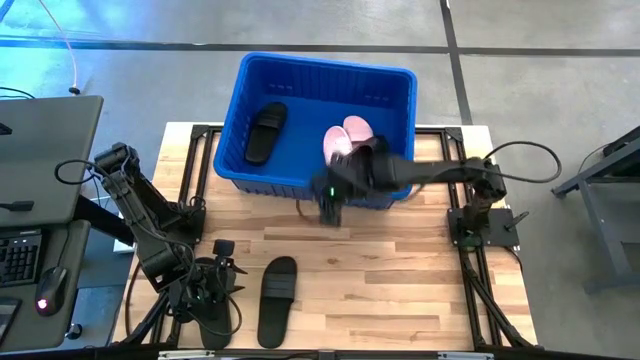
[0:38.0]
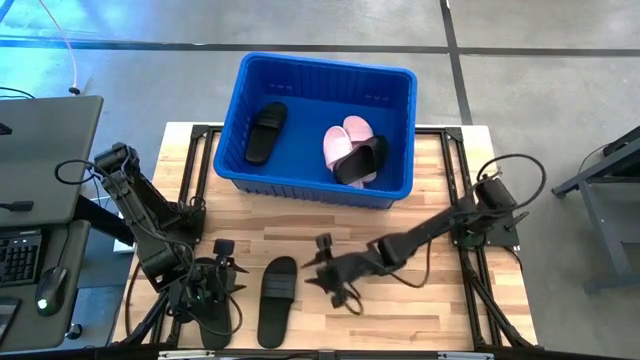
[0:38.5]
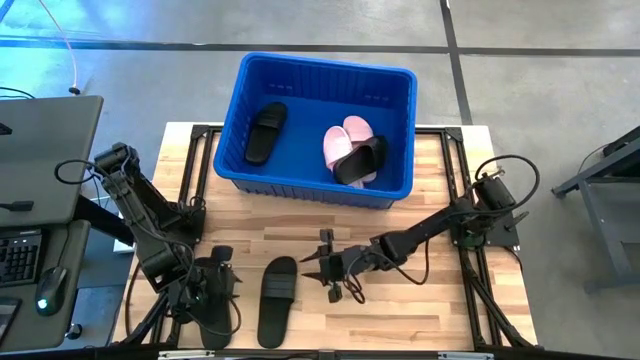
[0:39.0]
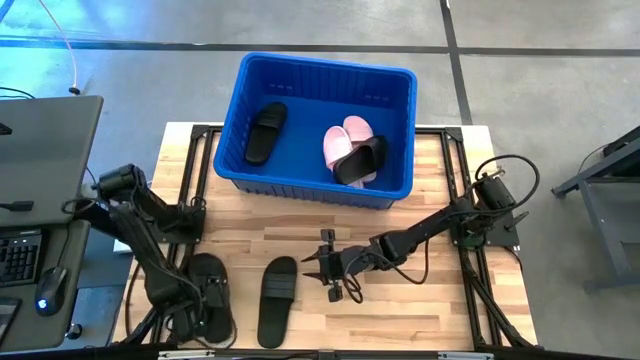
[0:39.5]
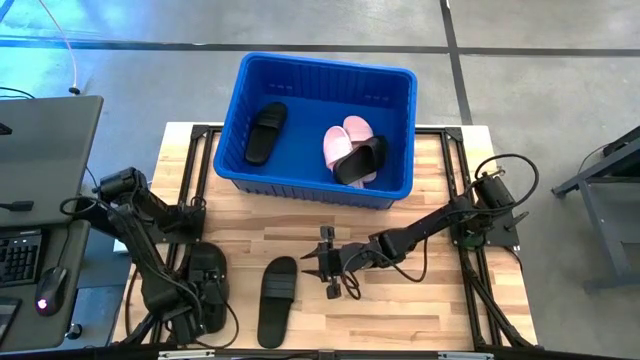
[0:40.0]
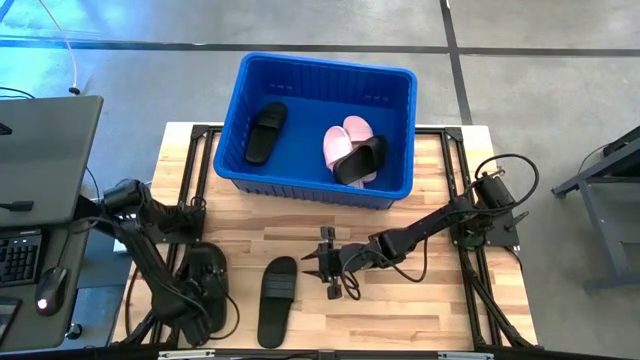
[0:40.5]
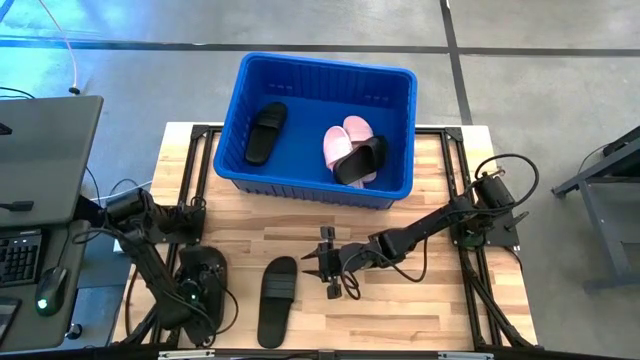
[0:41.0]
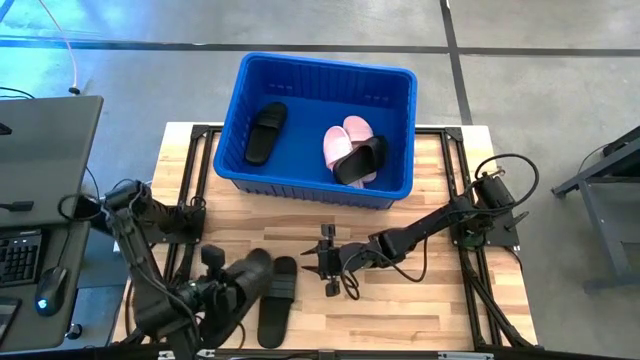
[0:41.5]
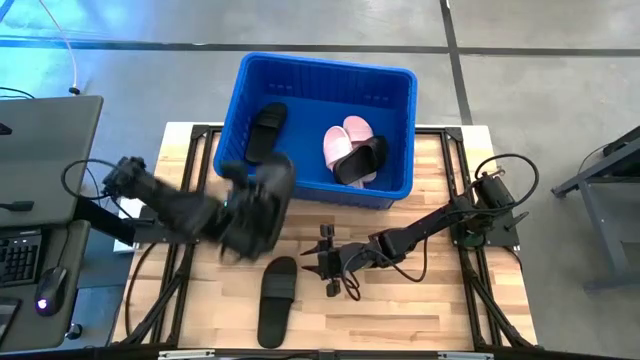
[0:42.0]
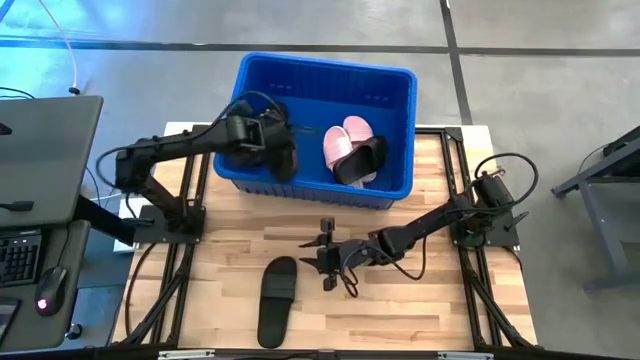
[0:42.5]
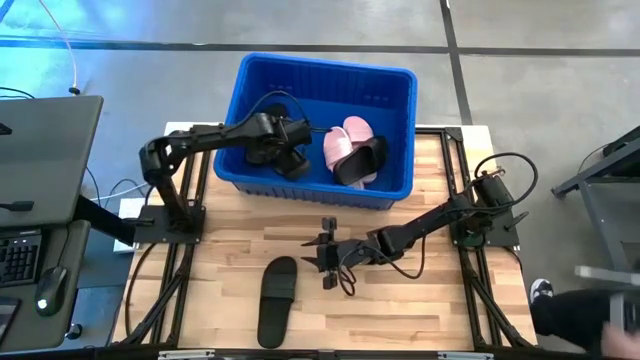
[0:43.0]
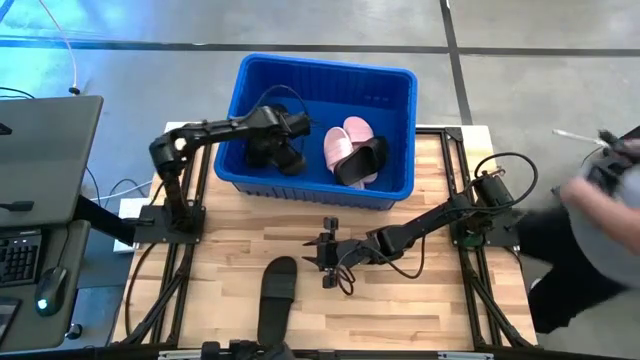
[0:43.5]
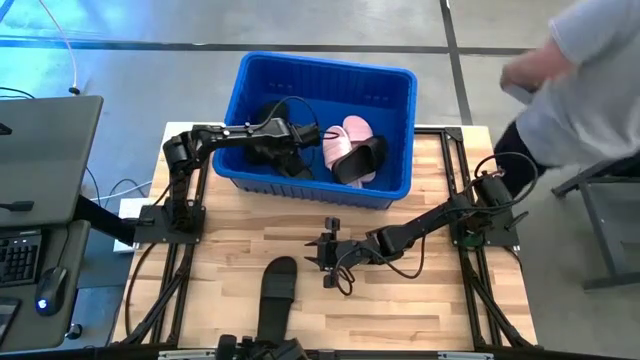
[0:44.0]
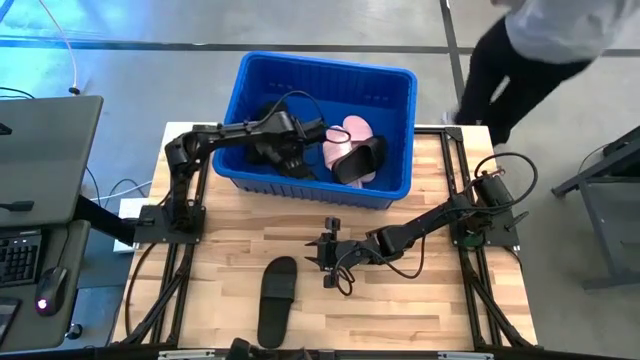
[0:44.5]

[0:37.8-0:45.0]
Task: Pick and place slides into bin
Put the black slipper into the blue basket

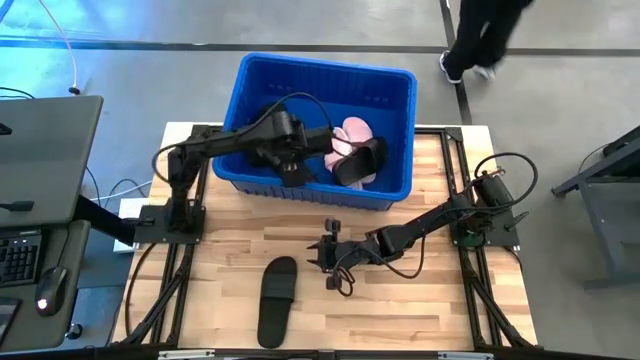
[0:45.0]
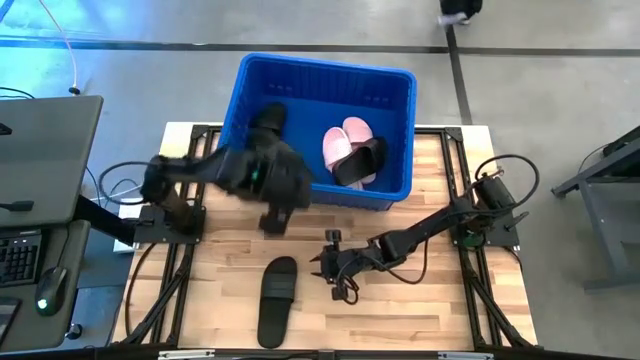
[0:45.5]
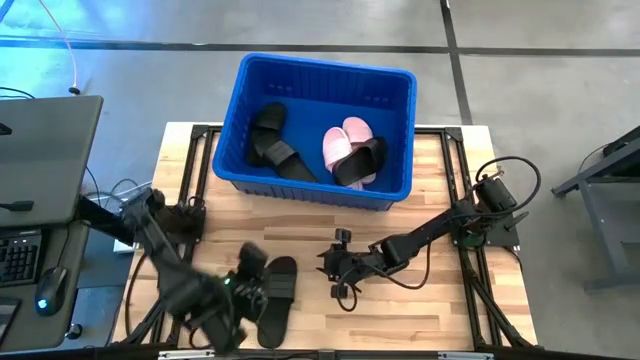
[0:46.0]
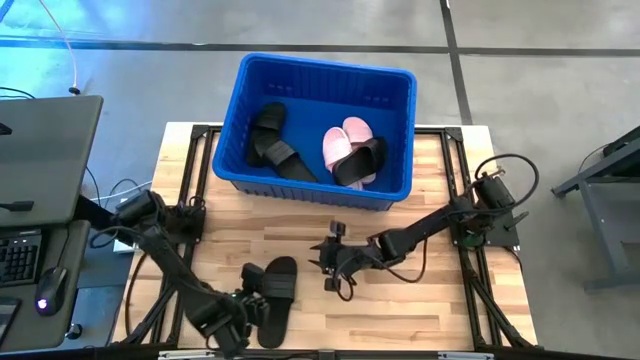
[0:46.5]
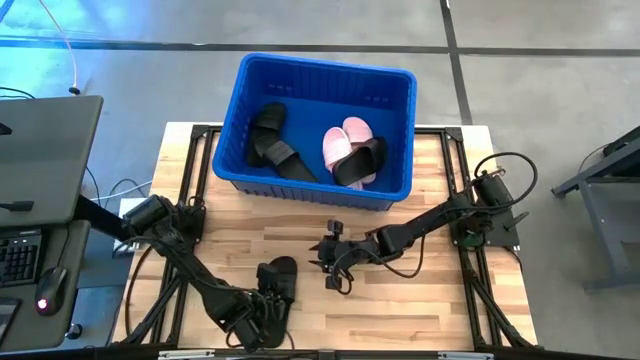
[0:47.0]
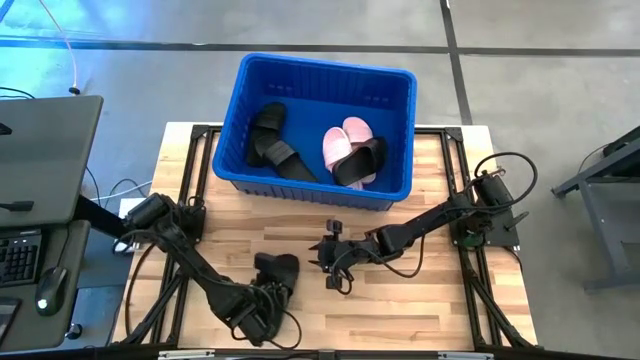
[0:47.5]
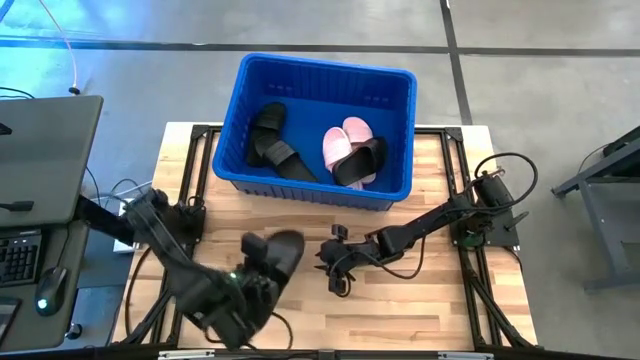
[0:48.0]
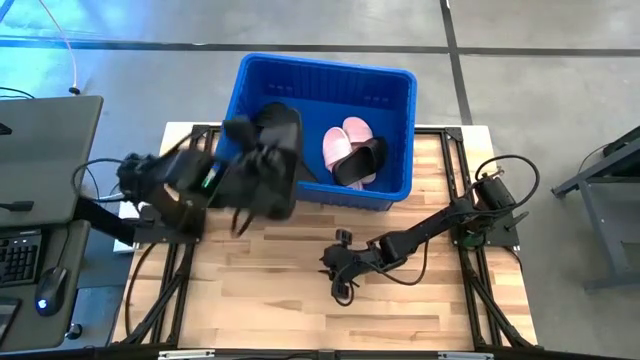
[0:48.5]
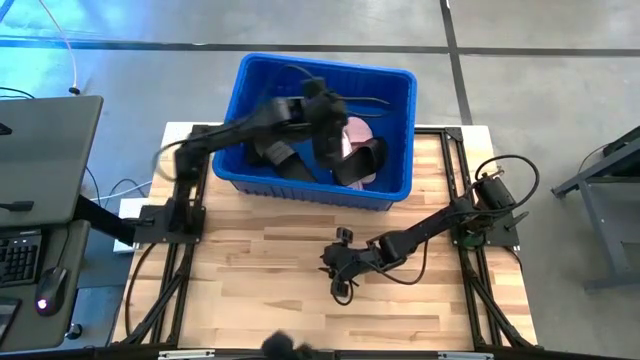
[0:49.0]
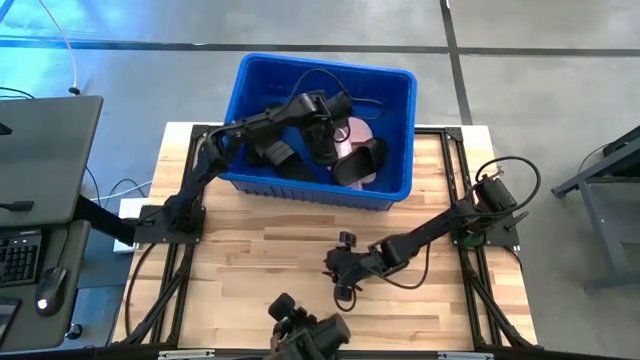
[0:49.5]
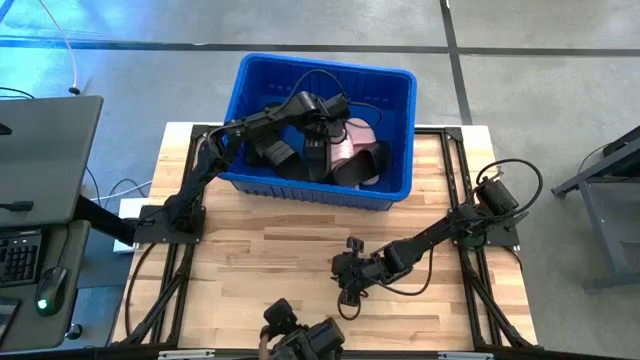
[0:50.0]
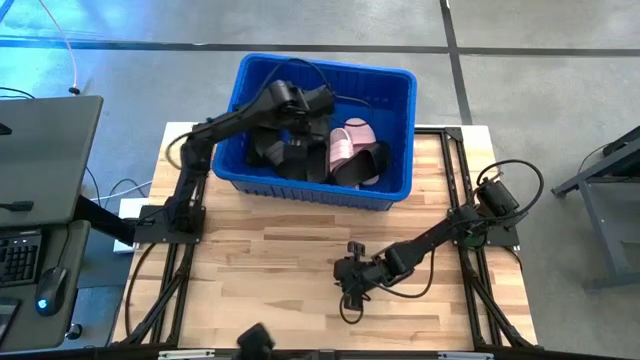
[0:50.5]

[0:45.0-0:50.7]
Put the black slipper into the blue basket

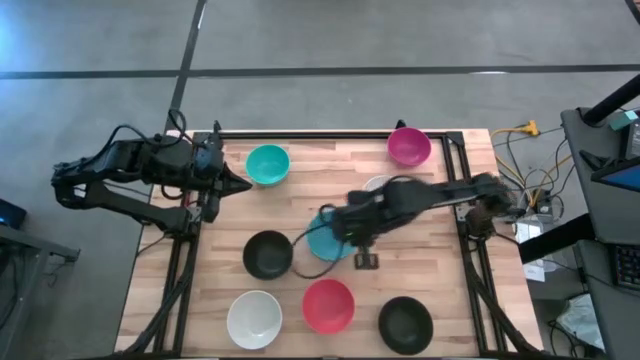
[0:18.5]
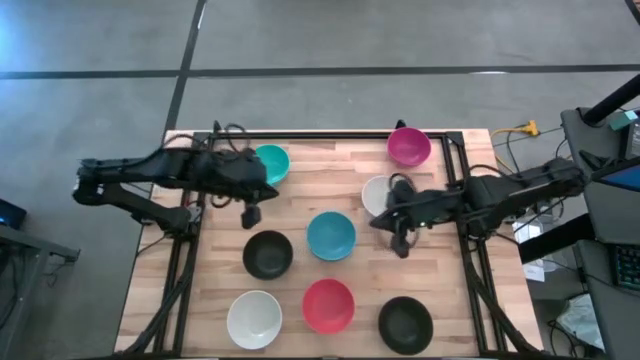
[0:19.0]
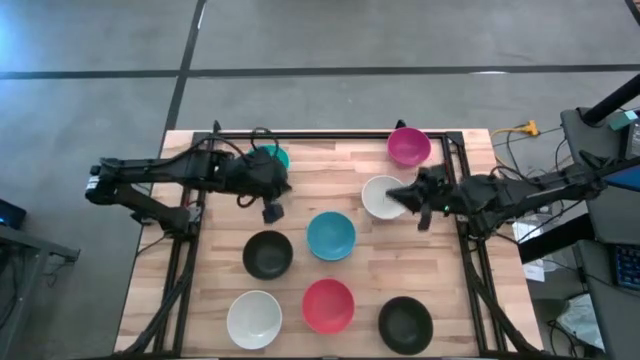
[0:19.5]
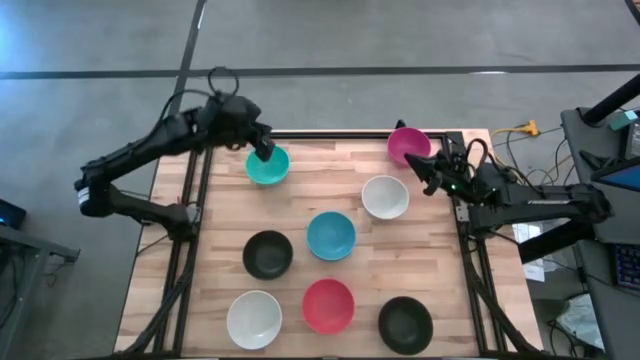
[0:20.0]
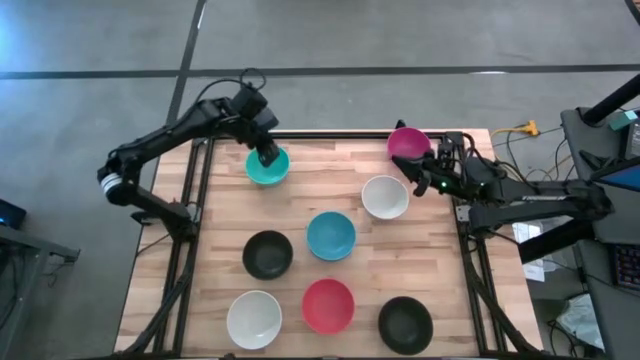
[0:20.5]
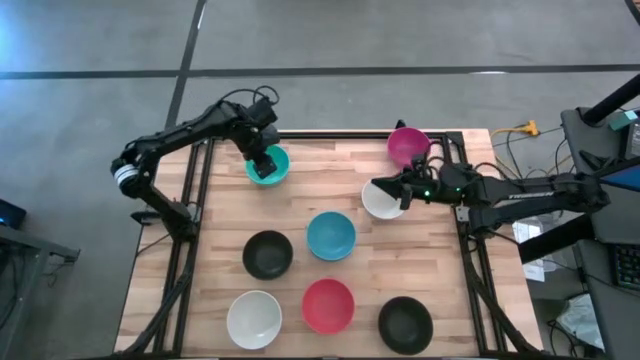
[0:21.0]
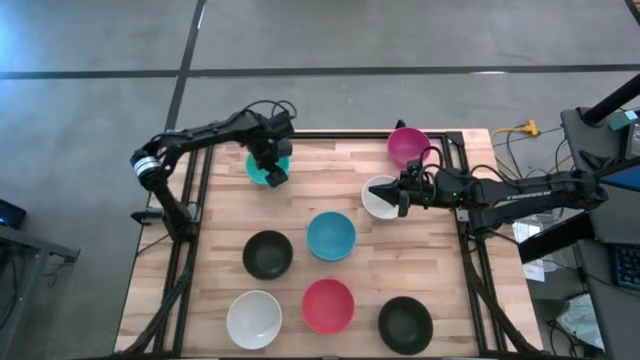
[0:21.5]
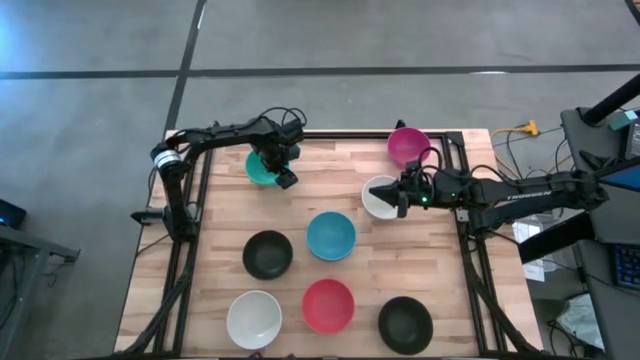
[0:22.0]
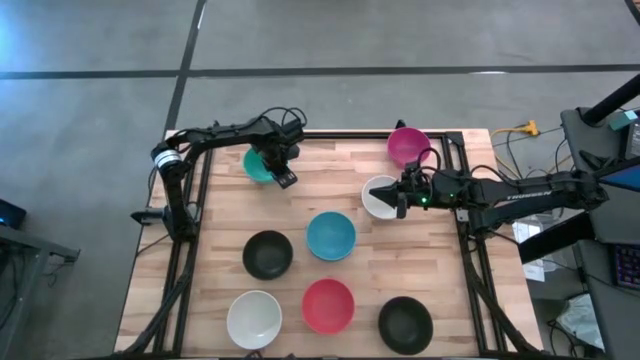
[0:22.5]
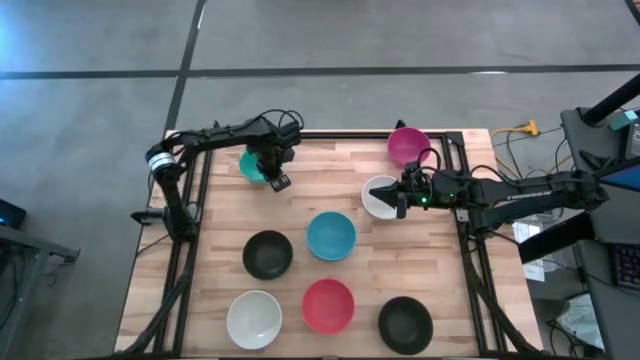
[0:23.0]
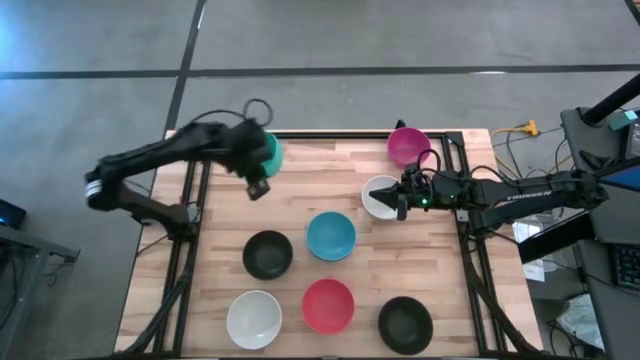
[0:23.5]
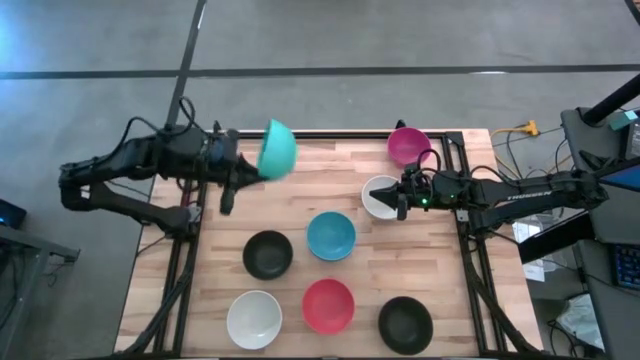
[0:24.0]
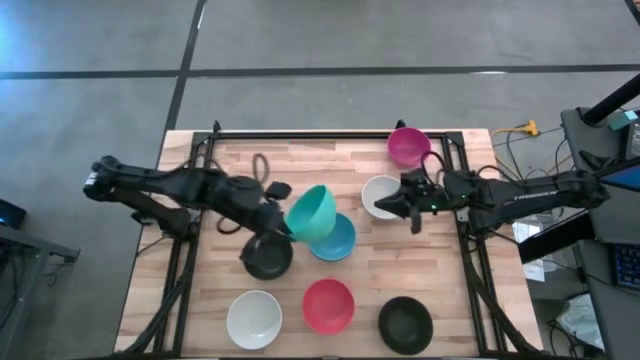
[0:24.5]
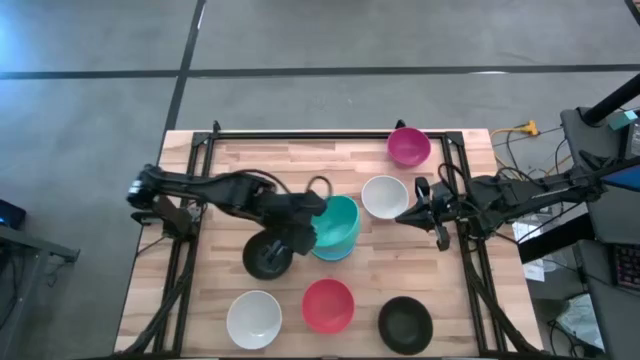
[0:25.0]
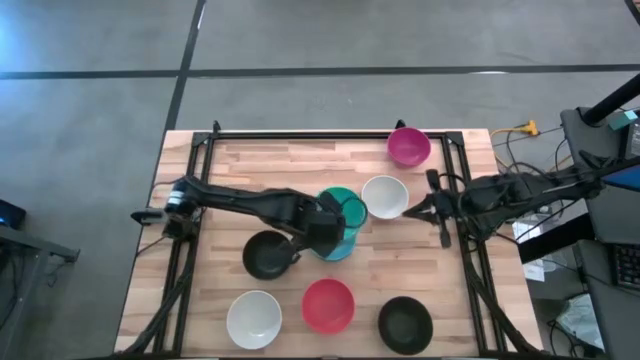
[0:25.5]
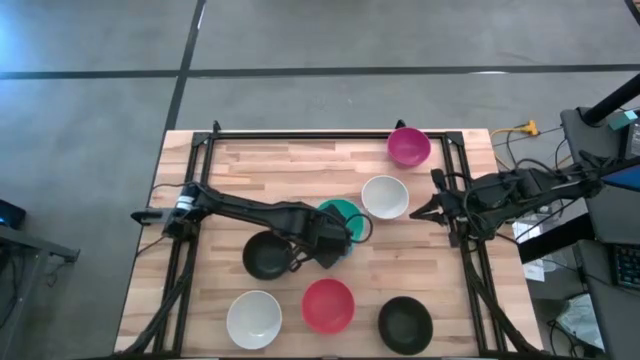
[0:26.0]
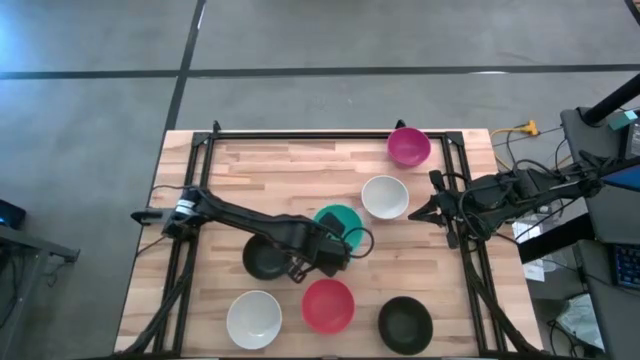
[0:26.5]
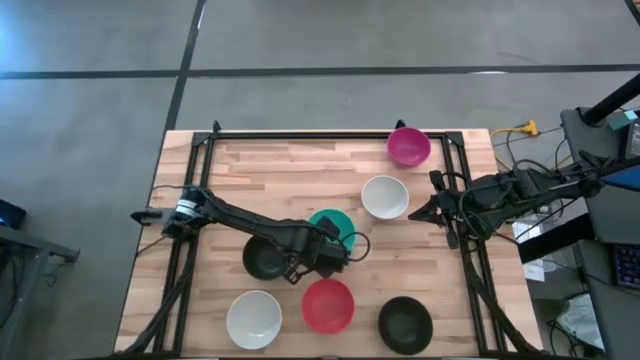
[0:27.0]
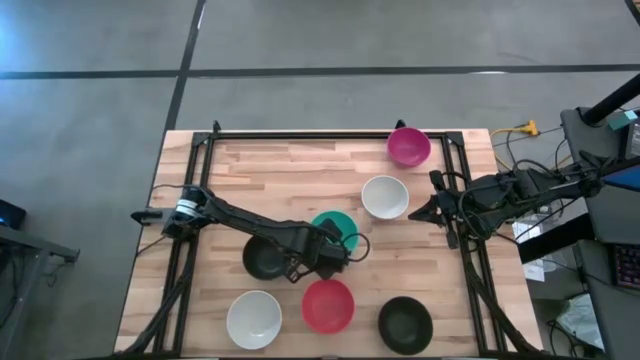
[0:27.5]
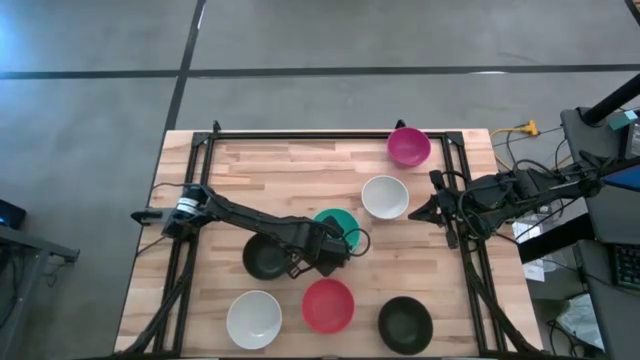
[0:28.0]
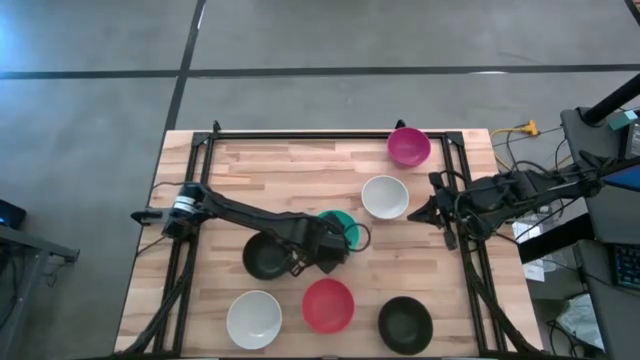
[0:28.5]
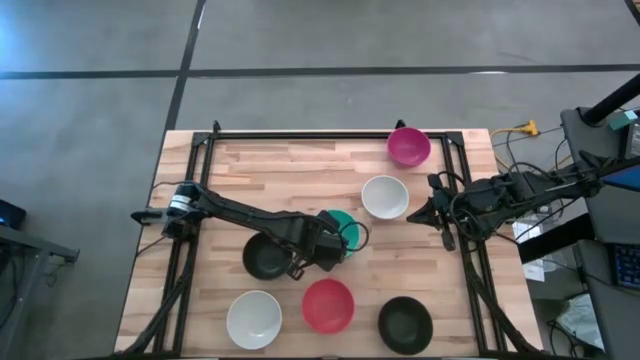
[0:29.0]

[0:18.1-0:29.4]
Task: Nest bowls inside each other
Stack the light blue bowl on top of the blue bowl
